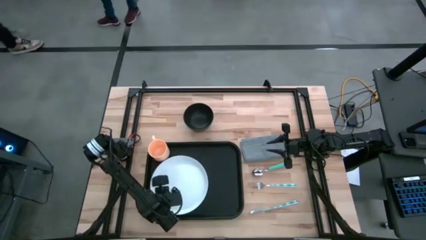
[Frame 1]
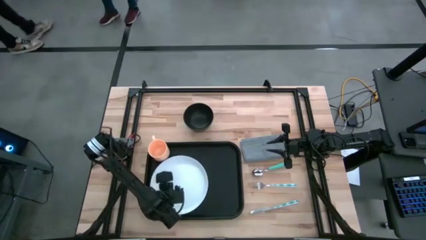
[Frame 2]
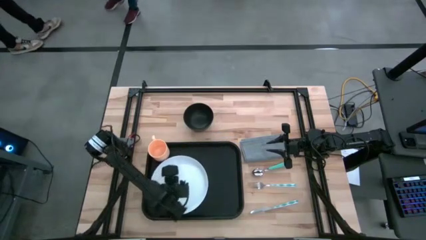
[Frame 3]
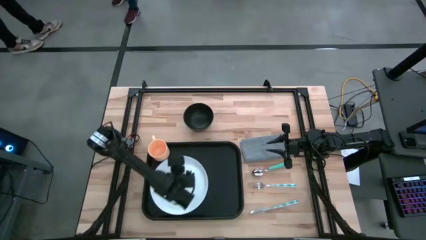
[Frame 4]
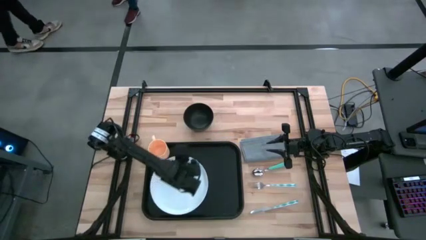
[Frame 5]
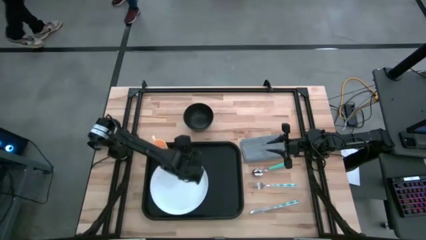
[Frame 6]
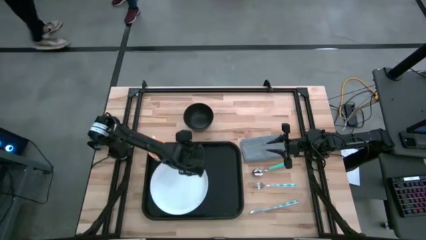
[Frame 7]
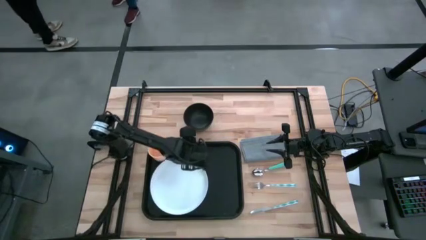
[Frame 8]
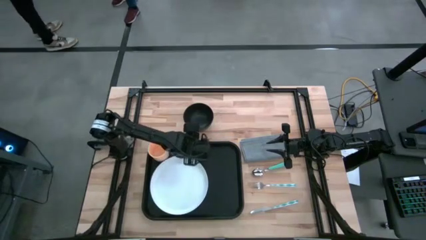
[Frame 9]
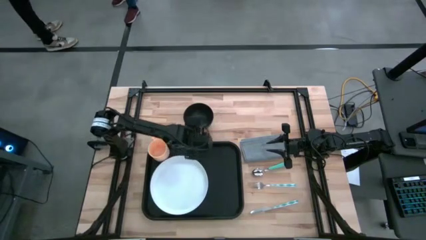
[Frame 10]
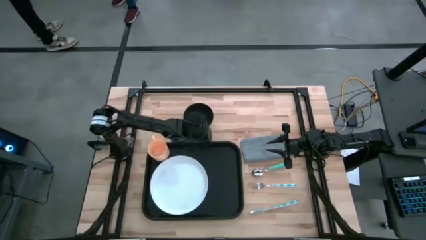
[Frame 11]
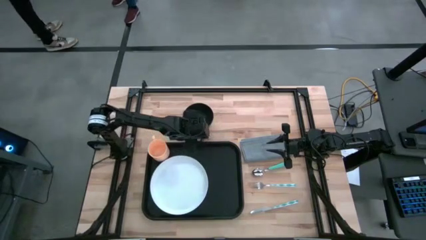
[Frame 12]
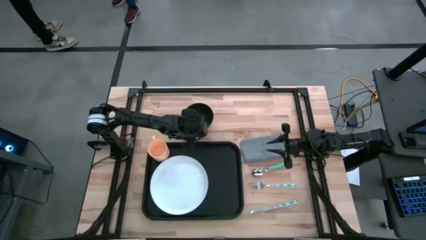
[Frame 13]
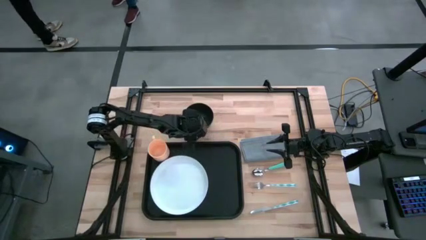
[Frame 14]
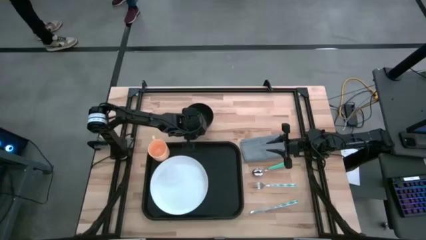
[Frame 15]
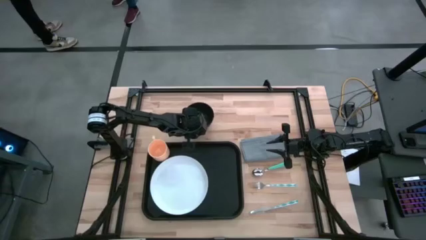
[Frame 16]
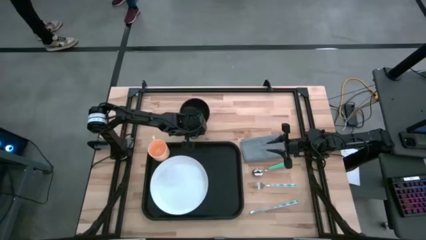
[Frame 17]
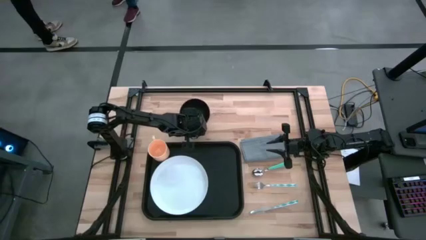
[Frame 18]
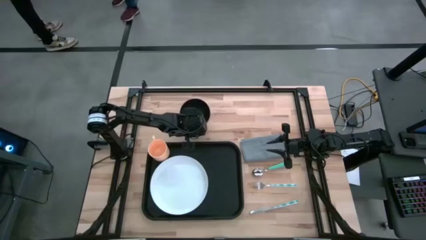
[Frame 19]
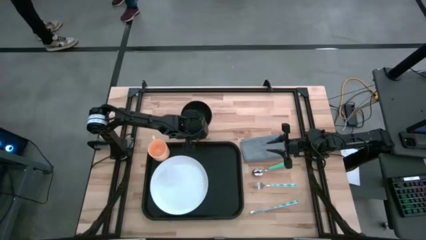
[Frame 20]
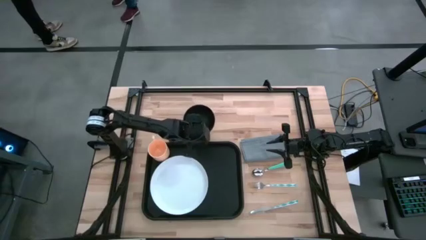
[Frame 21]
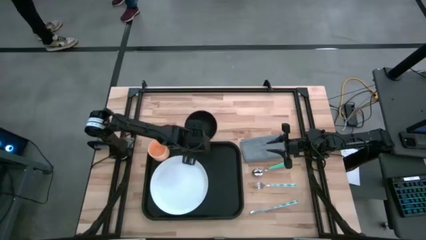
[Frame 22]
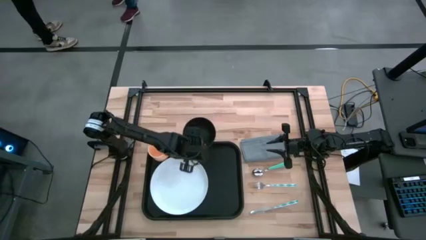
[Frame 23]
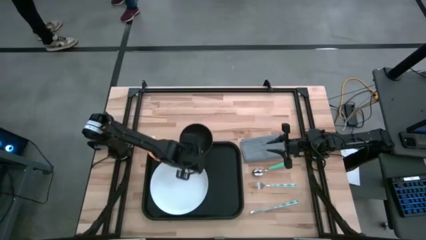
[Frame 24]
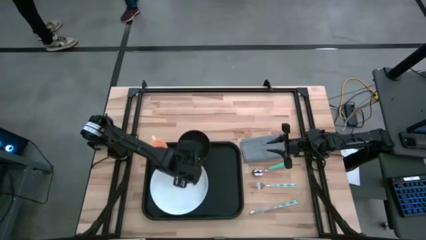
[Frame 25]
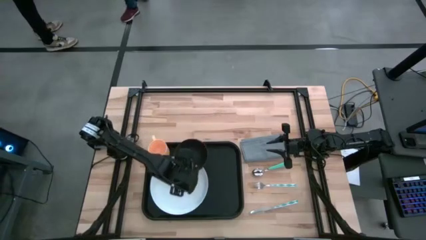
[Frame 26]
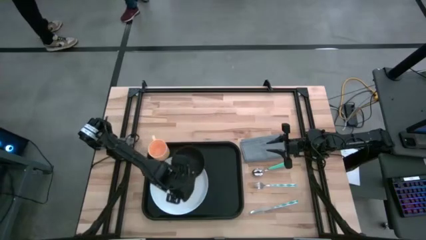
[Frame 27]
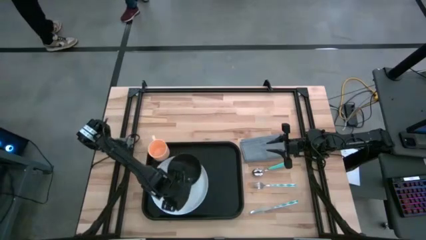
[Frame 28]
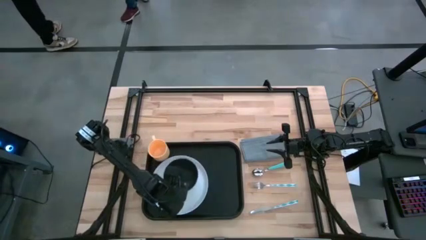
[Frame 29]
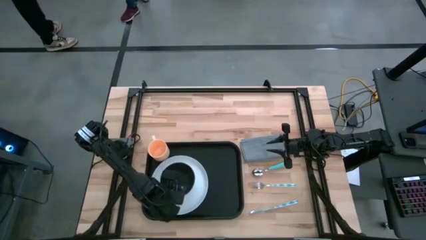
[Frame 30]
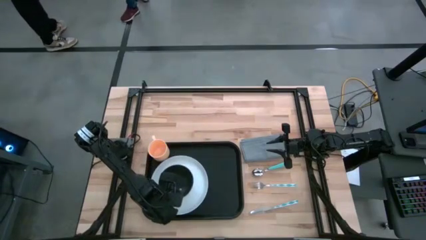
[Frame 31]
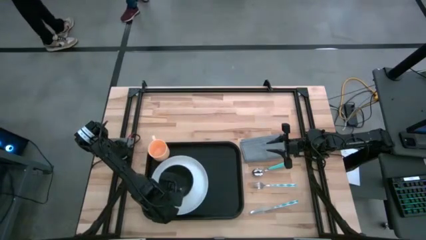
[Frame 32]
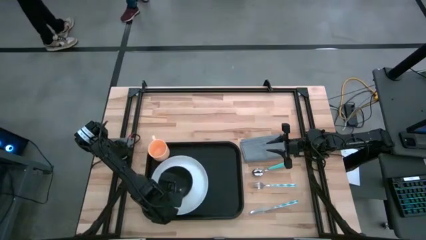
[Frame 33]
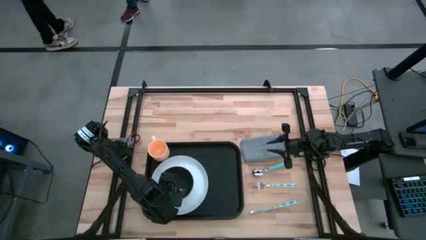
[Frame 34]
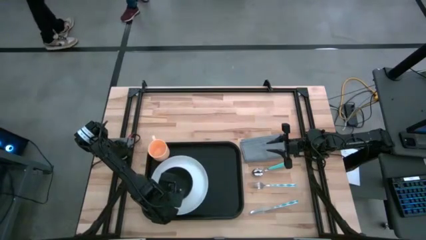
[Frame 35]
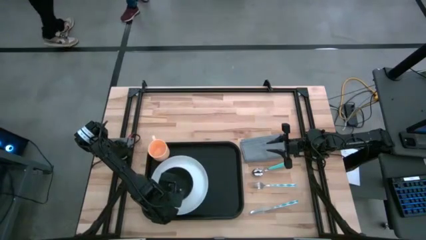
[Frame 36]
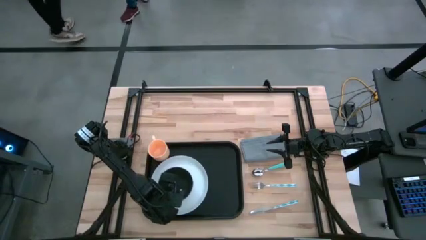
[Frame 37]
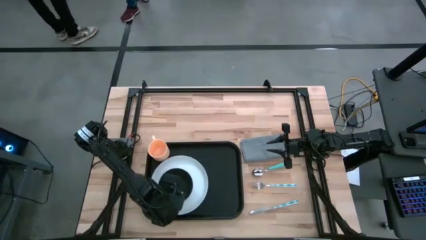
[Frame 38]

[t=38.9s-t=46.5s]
Task: Set up tray
Put the black bowl on top of the white plate on the black tray

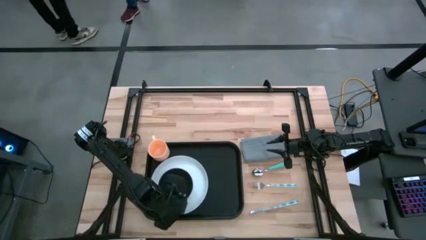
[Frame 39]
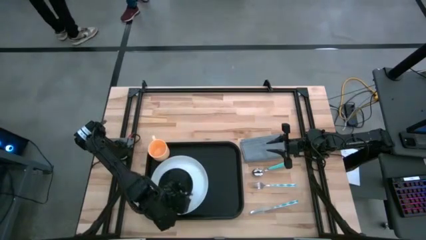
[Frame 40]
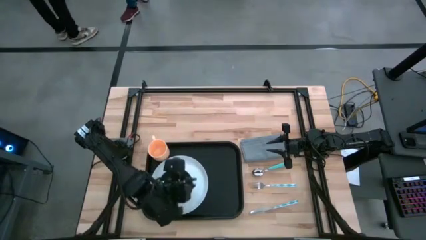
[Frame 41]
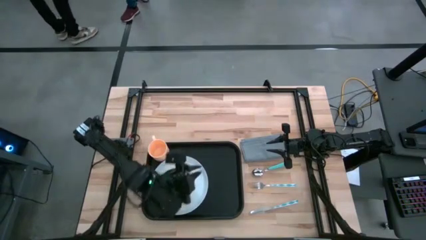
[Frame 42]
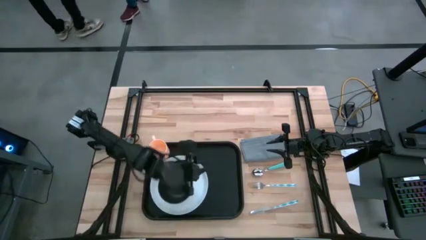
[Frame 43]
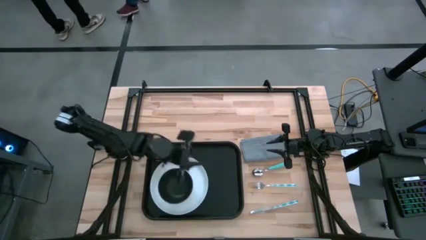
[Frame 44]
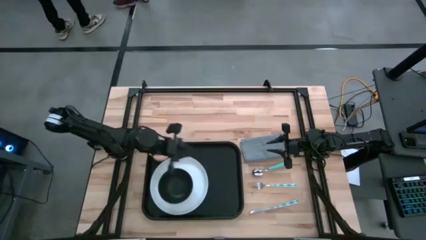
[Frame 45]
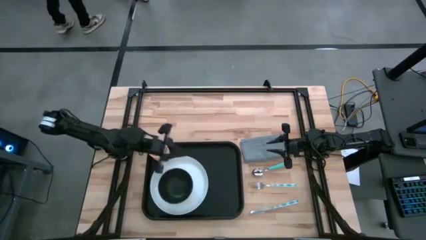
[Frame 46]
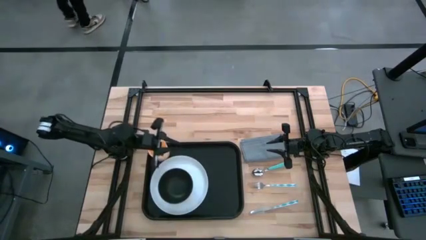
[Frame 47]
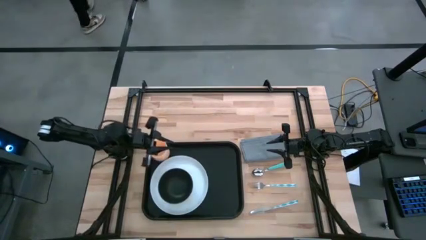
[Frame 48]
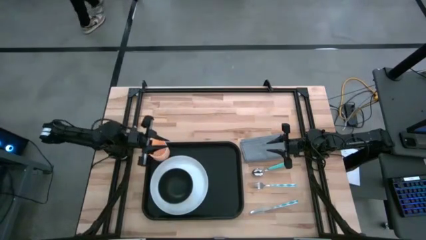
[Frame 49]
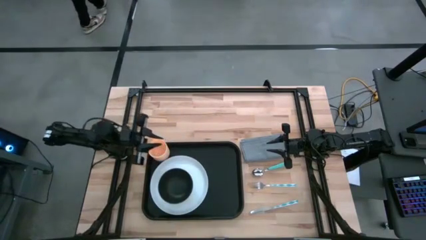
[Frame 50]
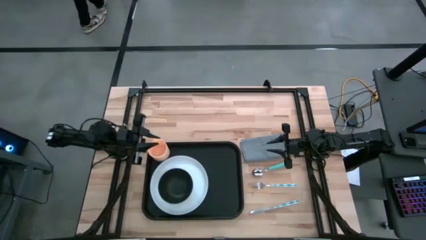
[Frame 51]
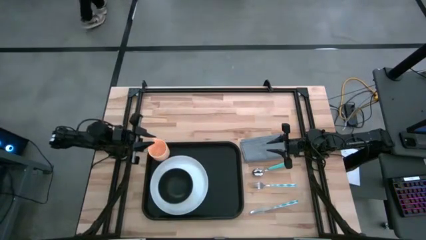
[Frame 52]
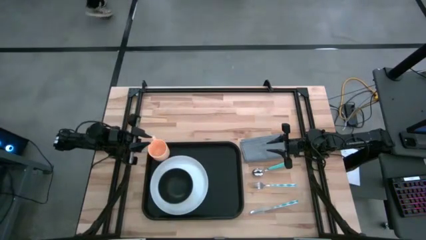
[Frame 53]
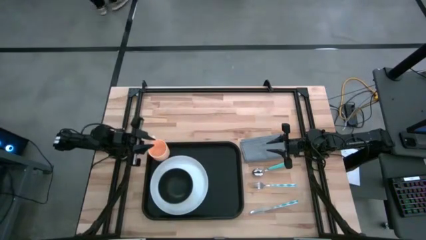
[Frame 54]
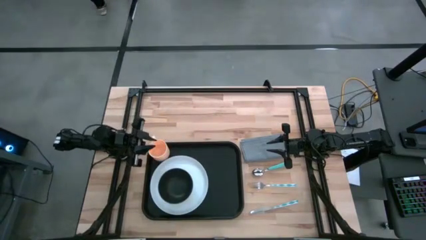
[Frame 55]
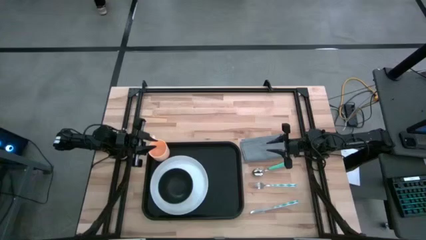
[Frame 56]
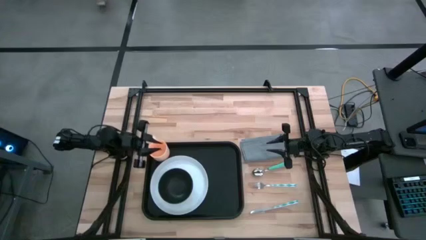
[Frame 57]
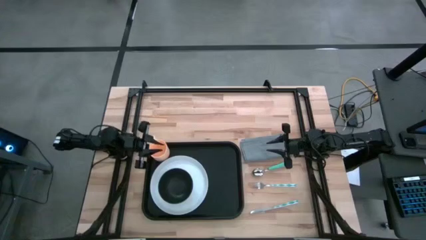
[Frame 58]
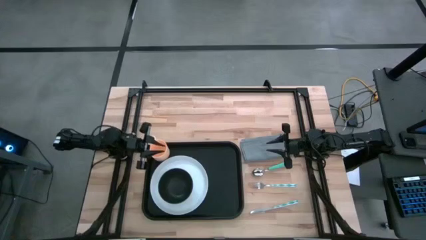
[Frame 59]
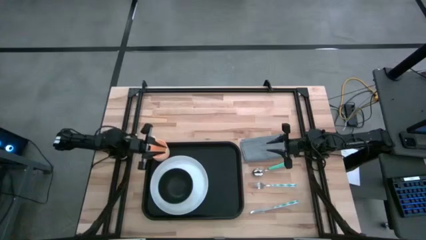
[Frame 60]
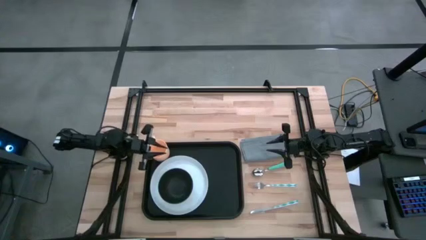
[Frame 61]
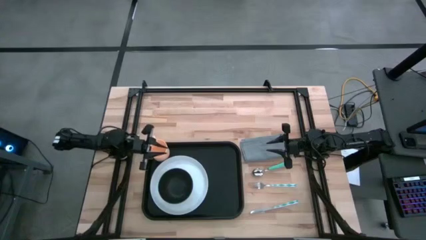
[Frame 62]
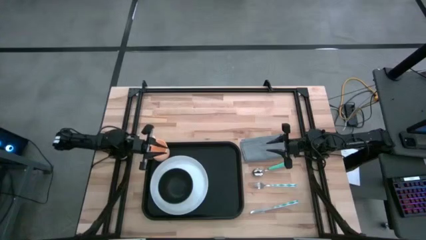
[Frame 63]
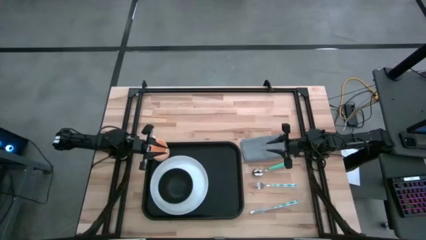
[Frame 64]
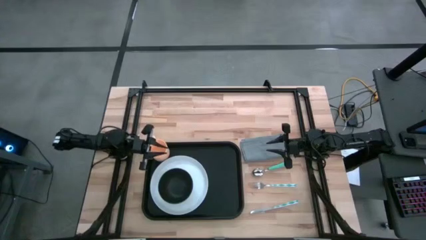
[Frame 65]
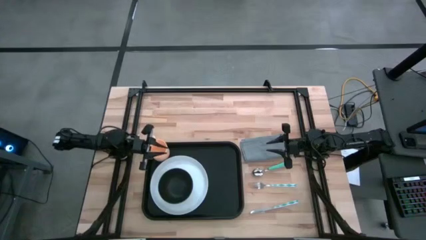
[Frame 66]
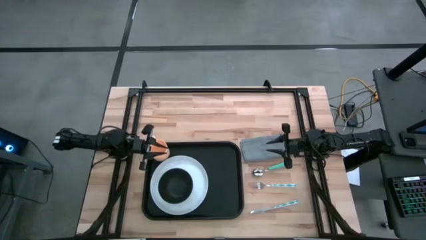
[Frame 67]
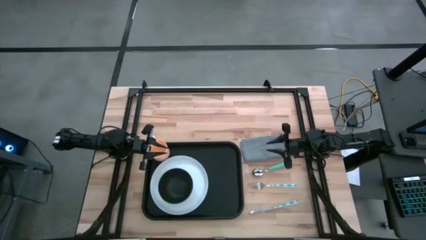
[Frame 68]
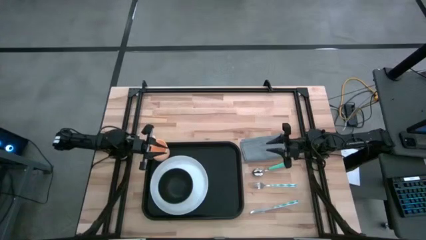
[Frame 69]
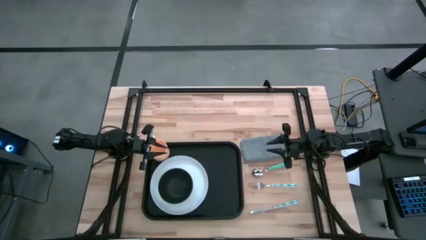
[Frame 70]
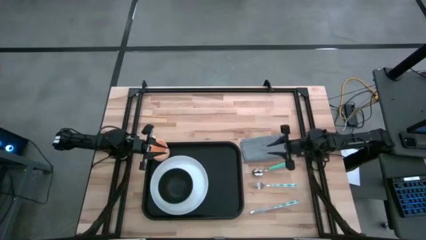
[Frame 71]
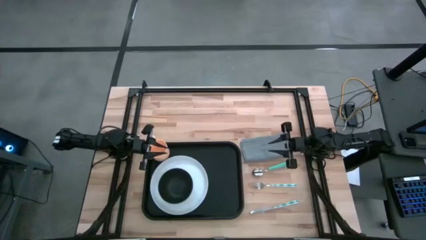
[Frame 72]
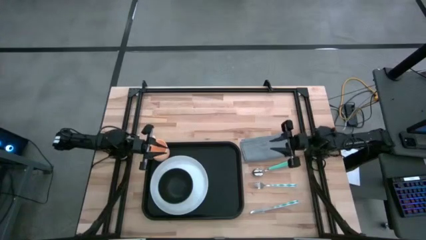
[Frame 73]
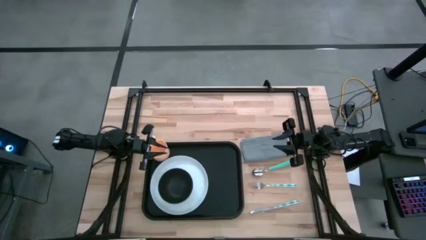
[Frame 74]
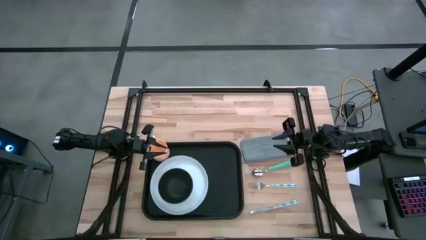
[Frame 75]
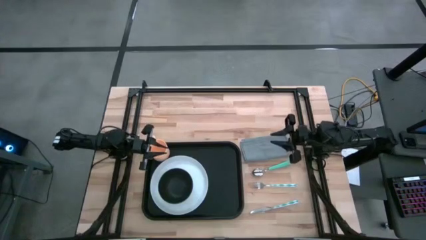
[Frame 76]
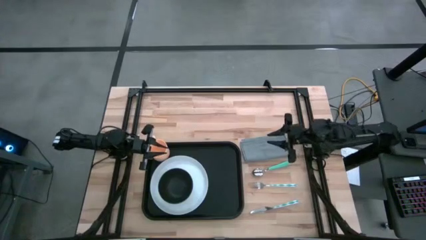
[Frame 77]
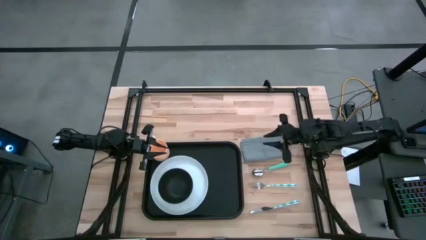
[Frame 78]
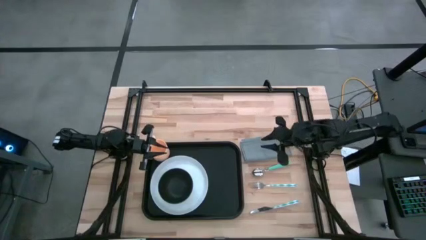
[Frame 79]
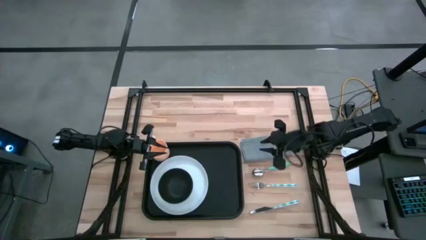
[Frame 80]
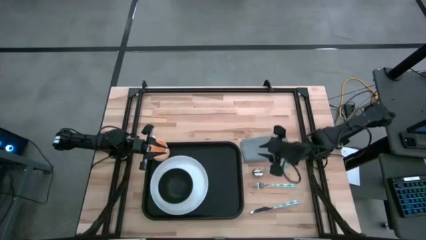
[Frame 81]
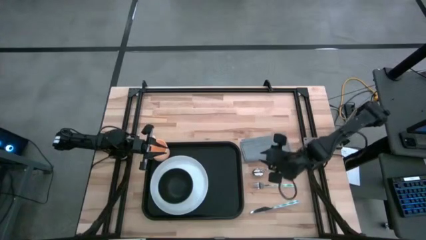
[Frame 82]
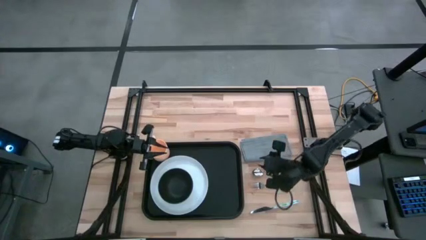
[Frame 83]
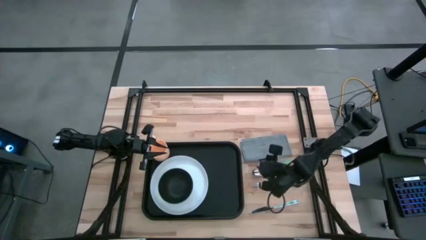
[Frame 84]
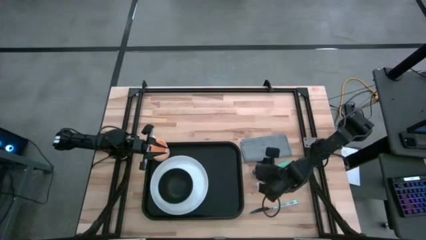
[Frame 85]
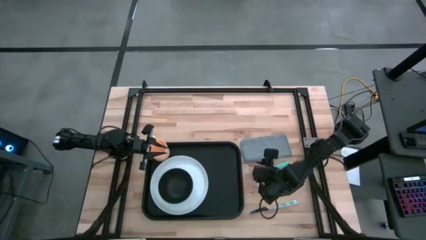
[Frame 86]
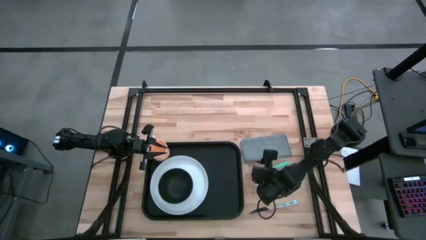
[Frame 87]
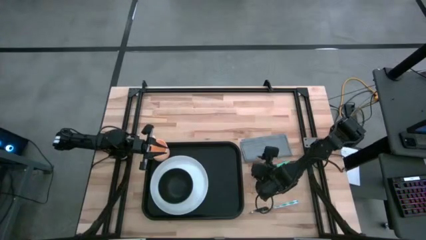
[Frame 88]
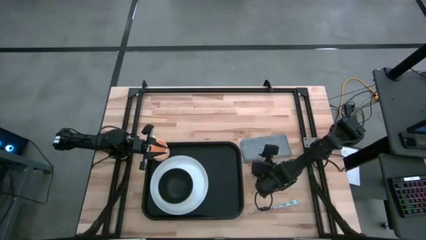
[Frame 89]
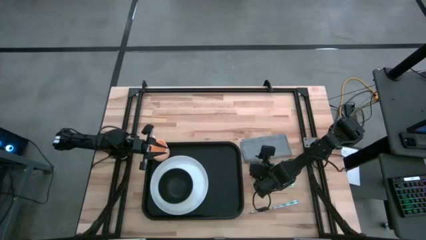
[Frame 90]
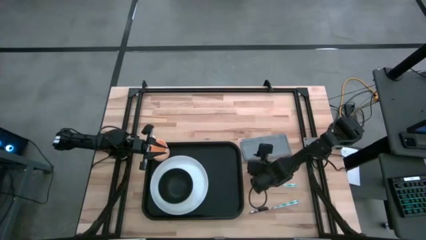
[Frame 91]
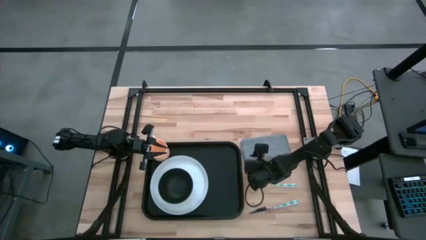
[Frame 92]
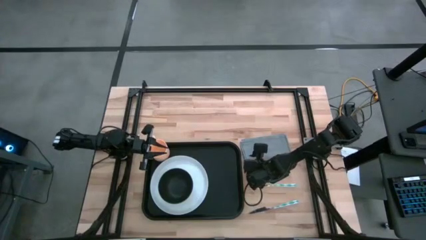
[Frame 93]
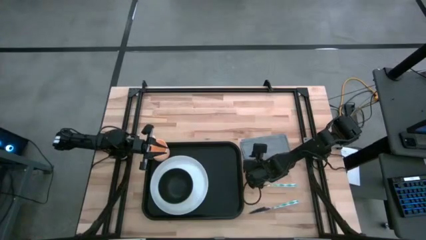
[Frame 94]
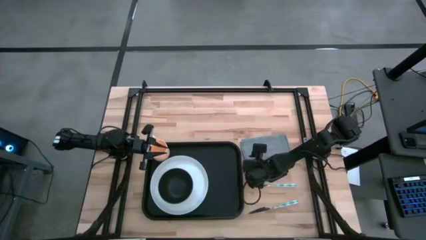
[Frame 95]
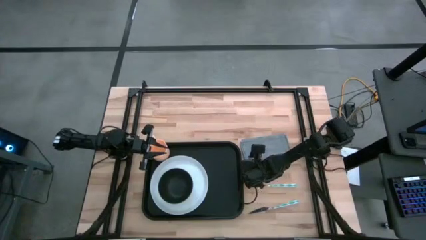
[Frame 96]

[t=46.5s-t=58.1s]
Put the gray napkin to the right of the white plate on the black tray
